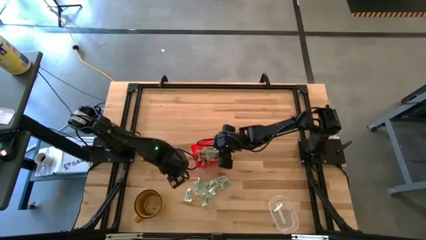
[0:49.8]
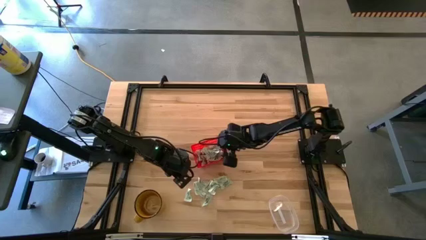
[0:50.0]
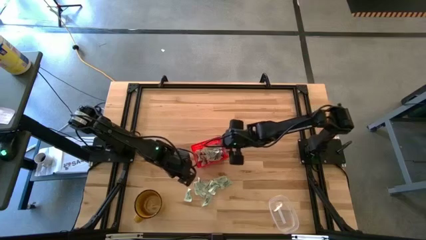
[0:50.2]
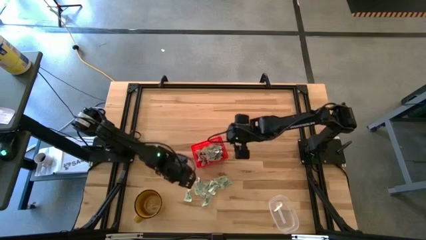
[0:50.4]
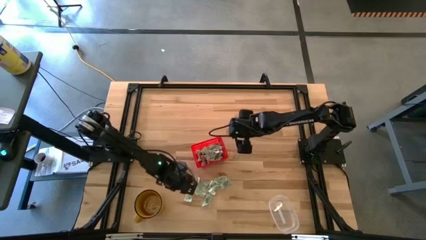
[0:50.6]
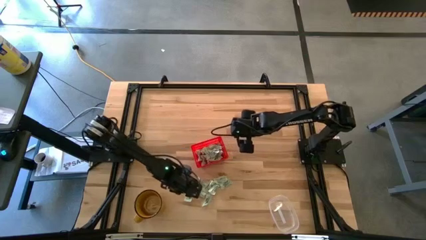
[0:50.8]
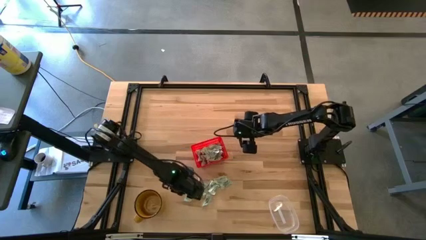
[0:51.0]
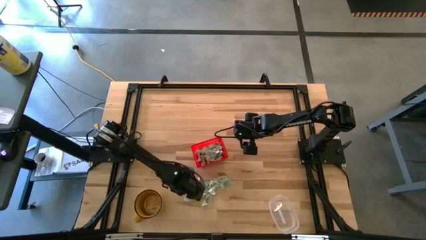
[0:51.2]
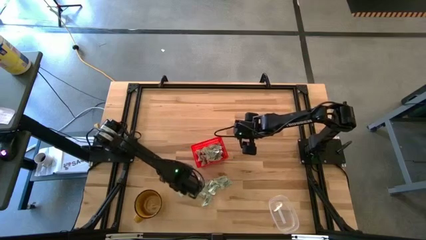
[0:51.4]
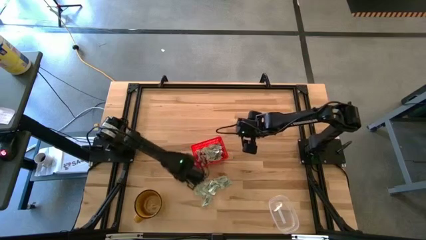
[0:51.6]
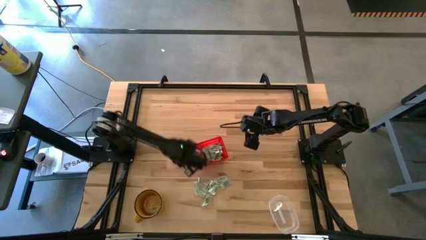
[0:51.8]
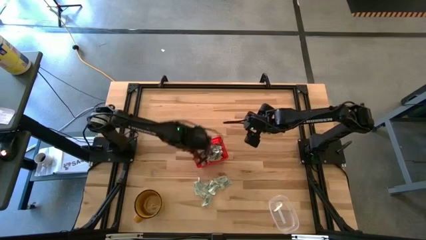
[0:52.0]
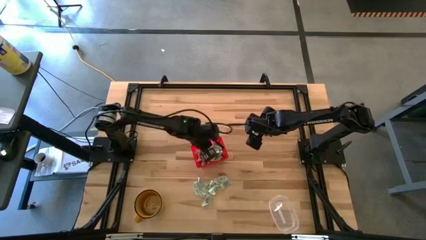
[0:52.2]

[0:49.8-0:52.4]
Task: Pick and place Stevia / Truvia into bins
Put the stevia packet into the orange basket

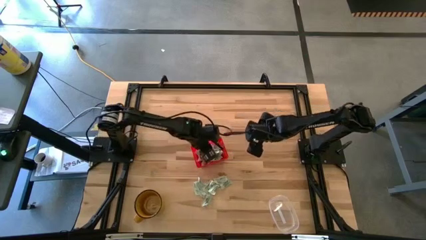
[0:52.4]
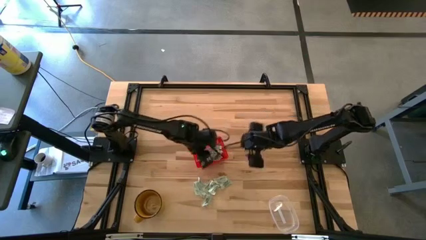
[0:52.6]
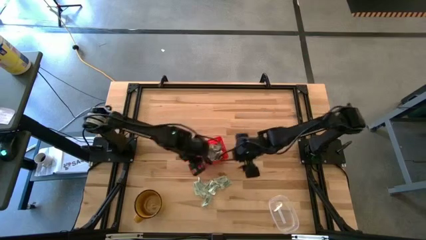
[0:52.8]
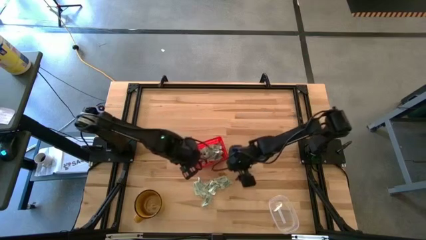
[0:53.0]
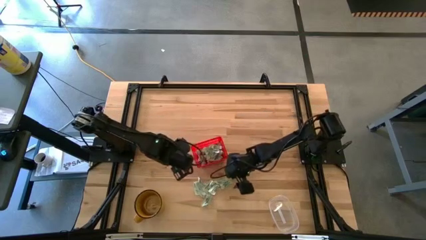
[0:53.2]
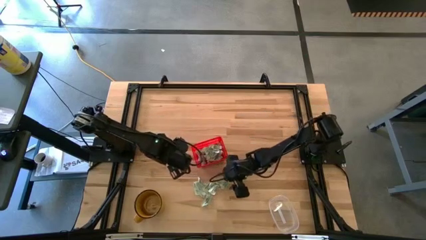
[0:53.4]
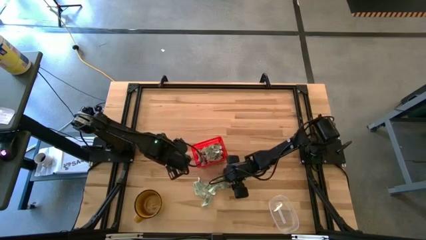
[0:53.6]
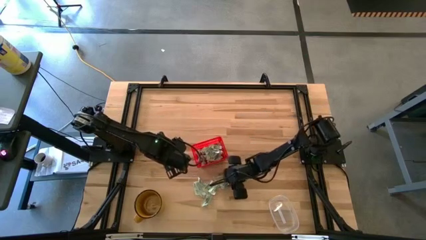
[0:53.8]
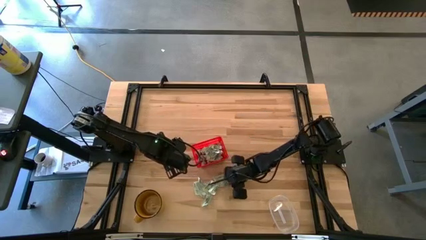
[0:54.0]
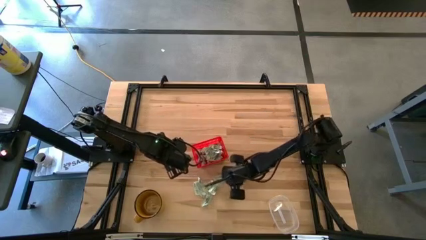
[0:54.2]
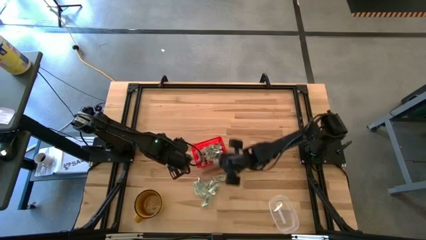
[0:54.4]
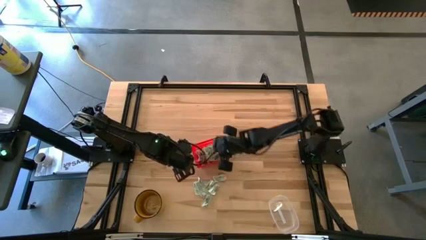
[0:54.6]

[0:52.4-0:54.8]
Put the stevia packet into the orange basket

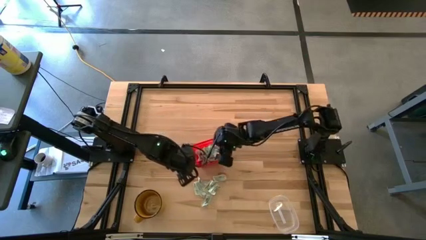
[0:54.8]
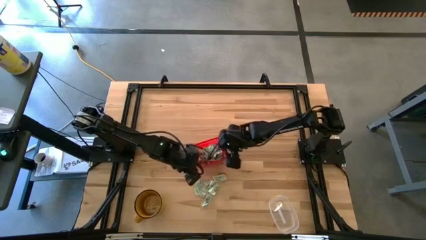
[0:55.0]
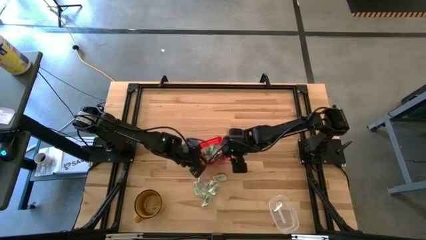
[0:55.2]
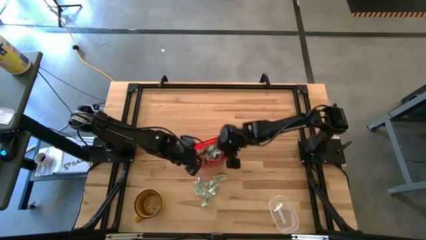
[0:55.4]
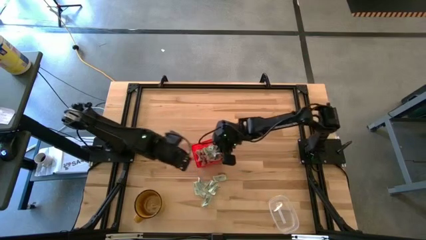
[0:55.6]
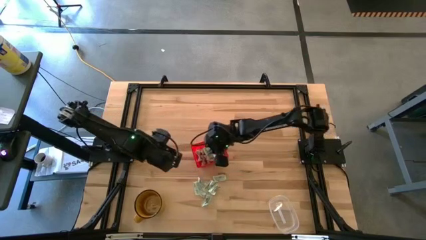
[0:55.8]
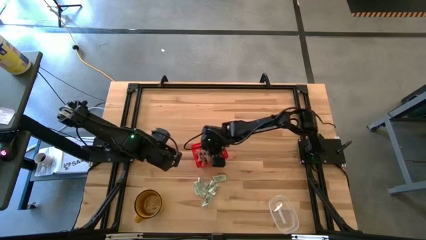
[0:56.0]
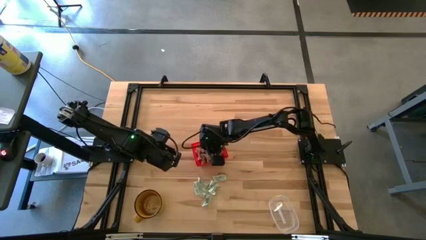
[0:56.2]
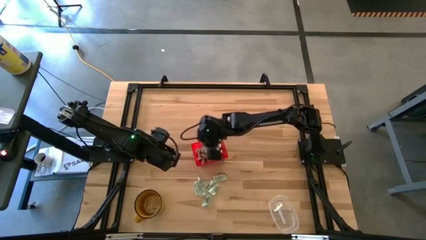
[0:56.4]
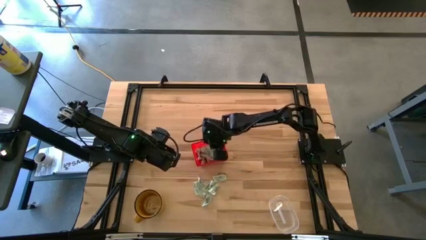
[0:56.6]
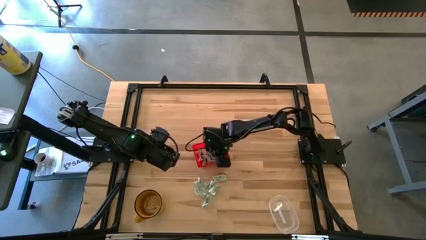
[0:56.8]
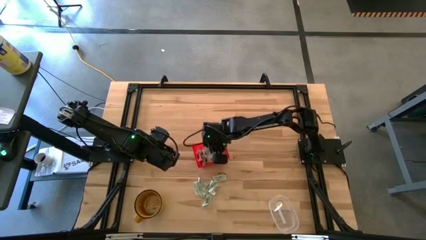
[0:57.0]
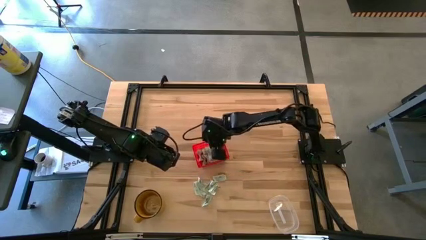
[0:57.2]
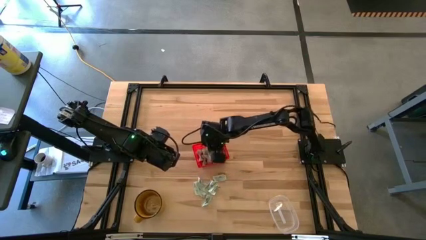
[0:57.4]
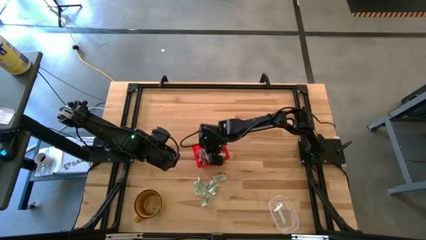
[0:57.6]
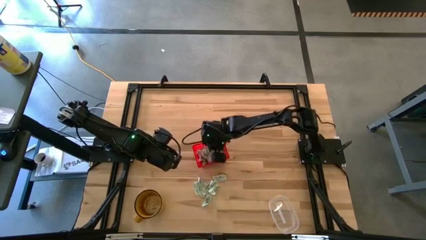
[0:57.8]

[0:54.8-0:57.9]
Adjust the stevia packets in the orange basket

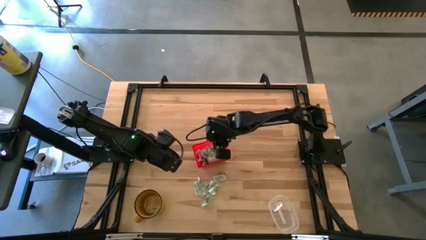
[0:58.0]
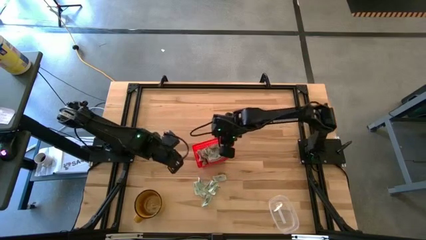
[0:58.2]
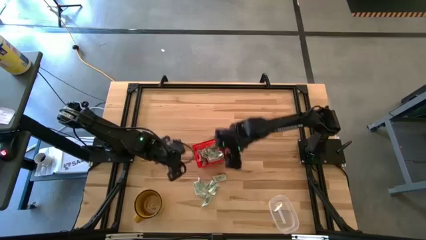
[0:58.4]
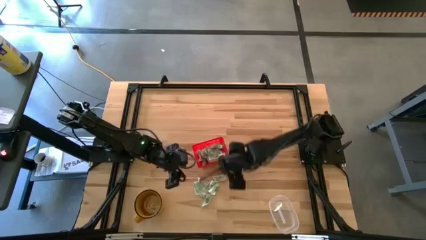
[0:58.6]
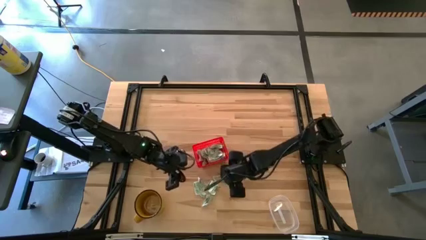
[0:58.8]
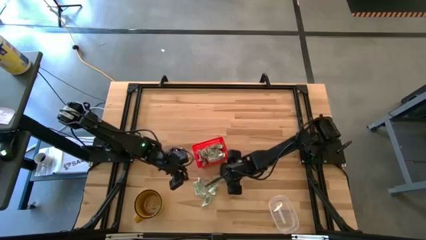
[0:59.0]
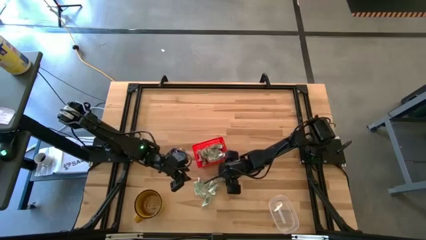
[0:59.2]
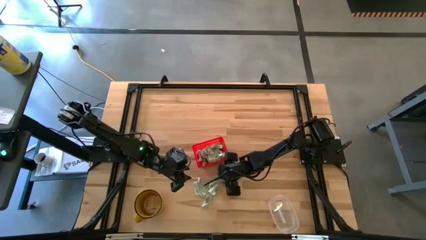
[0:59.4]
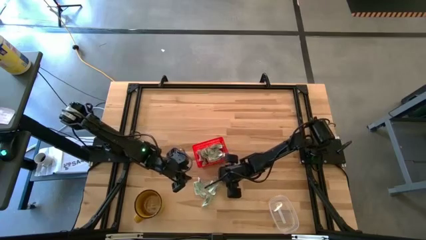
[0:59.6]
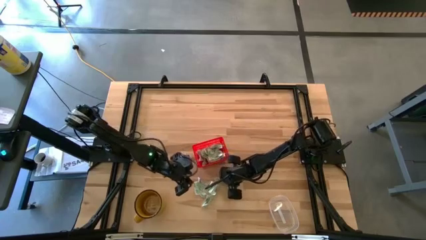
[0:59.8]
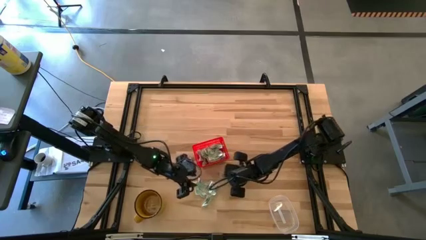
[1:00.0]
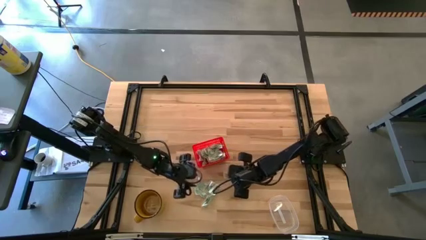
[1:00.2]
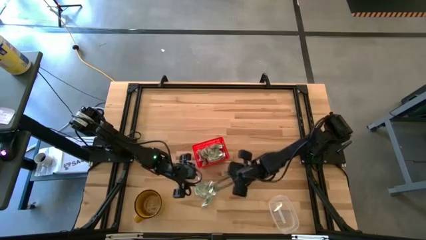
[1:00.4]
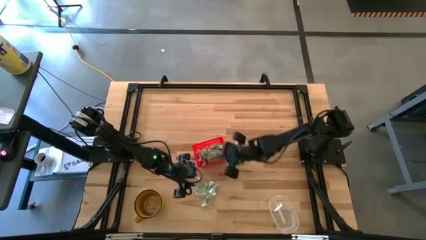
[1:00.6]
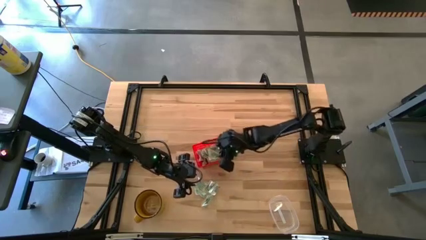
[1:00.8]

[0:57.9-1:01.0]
Put the stevia packet into the orange basket

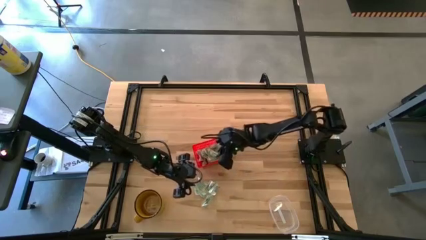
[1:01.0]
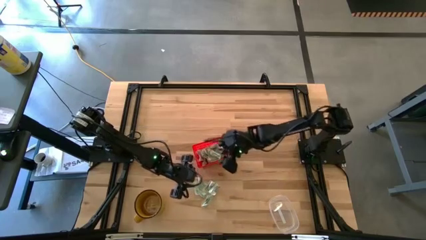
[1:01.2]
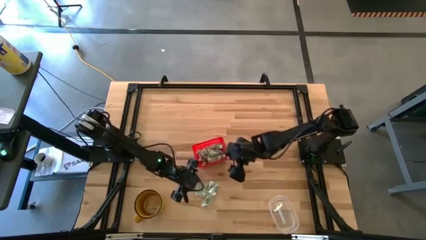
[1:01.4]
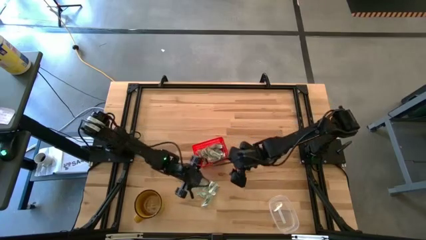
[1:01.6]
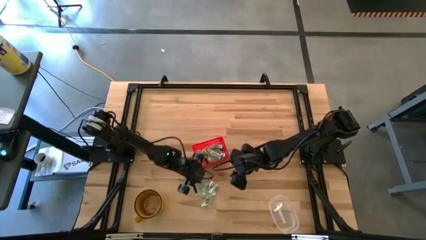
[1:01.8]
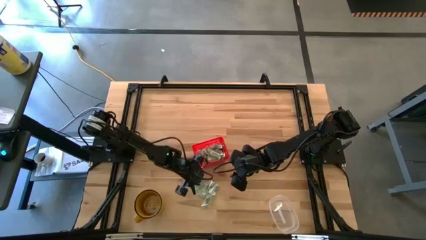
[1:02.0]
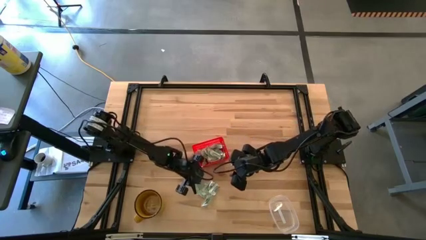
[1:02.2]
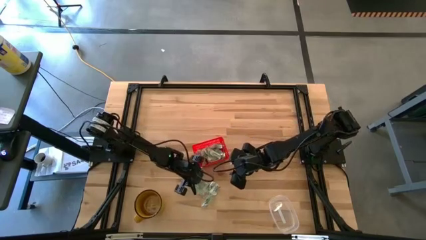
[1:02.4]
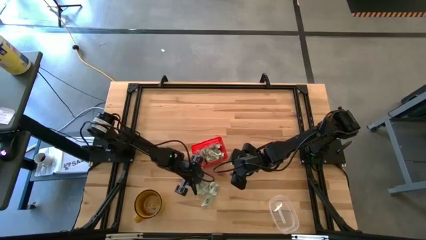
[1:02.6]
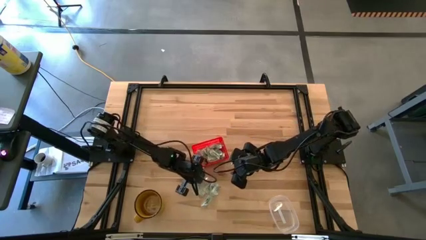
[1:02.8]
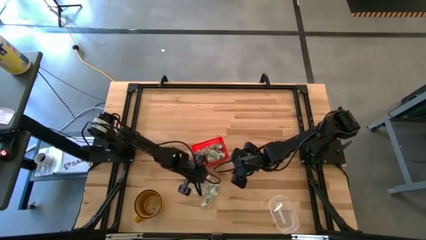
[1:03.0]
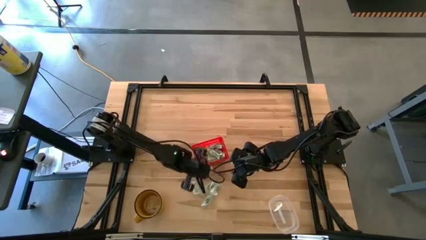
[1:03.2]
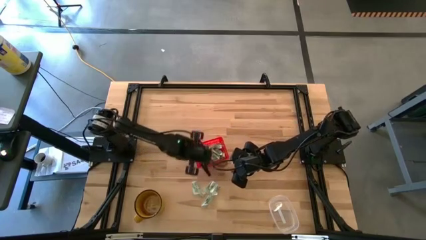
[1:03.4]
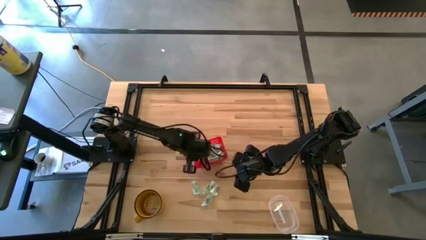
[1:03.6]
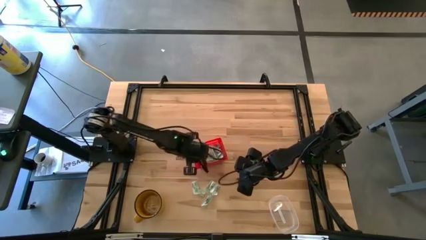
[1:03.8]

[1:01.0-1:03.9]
Put the stevia packet into the orange basket

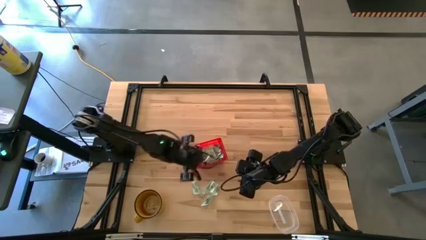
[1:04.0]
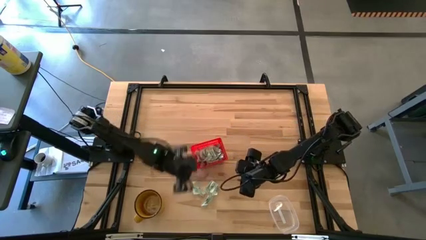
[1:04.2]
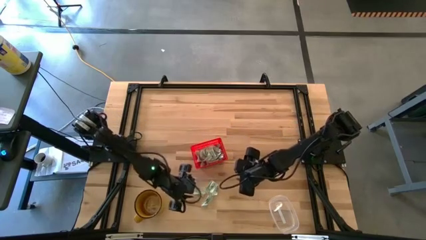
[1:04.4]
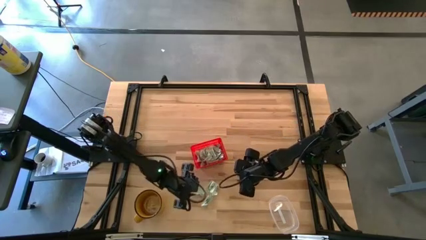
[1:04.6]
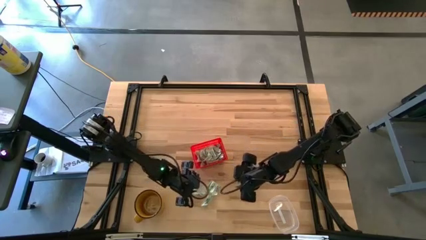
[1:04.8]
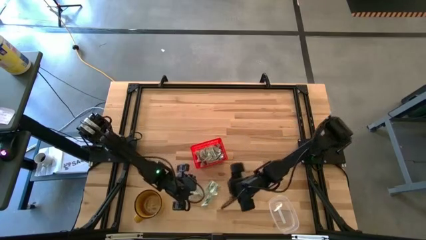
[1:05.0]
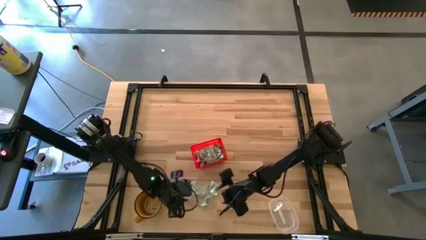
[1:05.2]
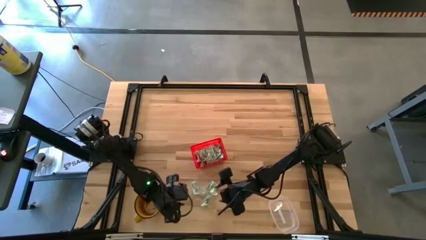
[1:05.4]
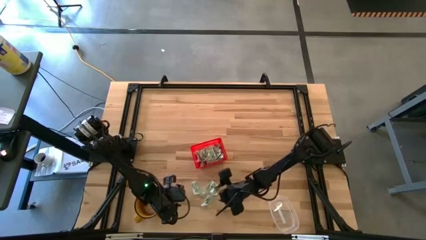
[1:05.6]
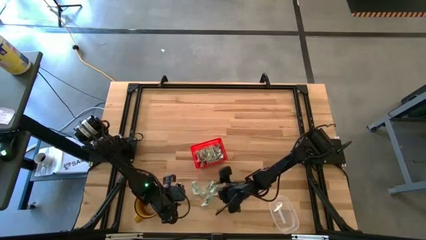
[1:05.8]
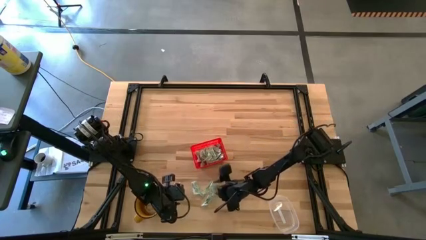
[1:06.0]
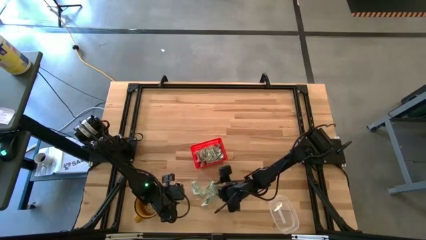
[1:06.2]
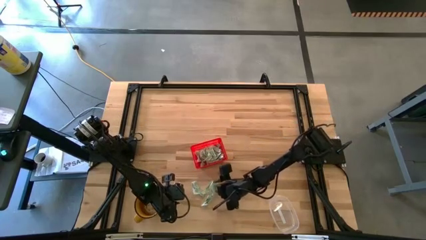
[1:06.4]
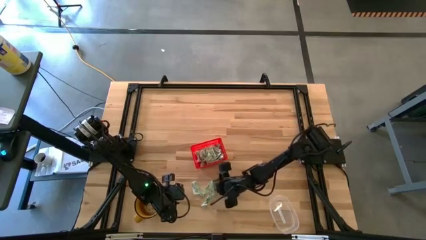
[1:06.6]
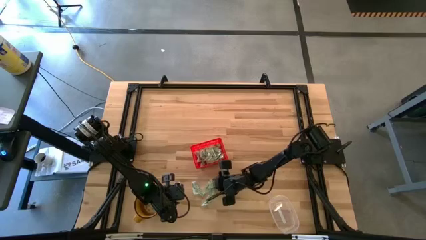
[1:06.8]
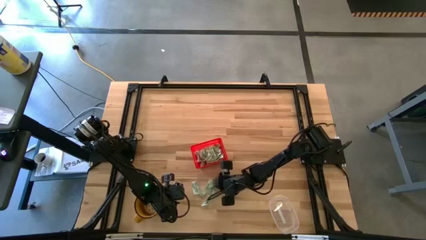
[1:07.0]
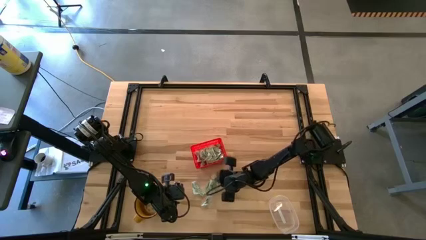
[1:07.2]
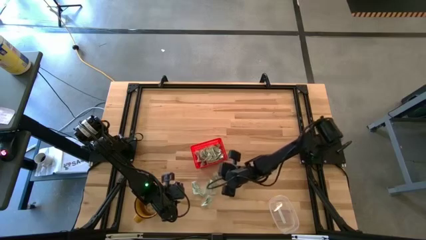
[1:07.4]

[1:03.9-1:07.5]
Put the stevia packet into the orange basket
